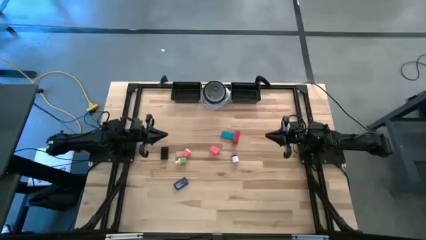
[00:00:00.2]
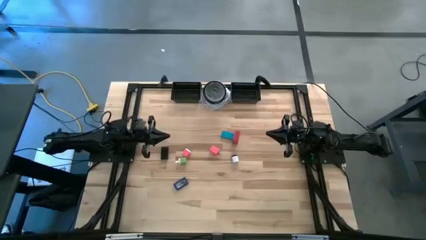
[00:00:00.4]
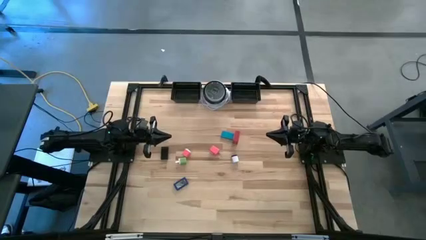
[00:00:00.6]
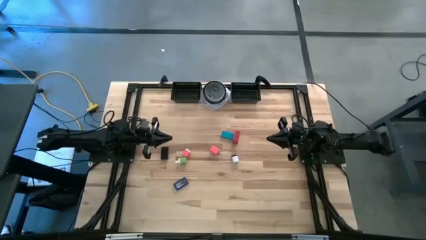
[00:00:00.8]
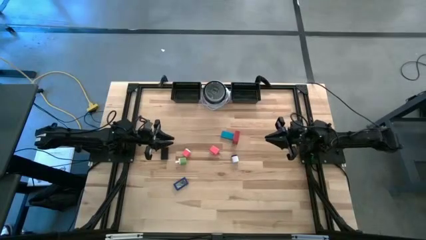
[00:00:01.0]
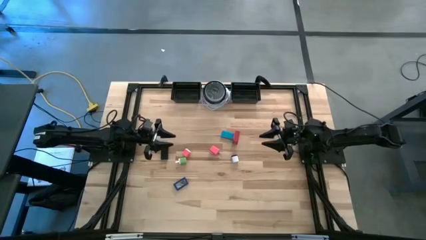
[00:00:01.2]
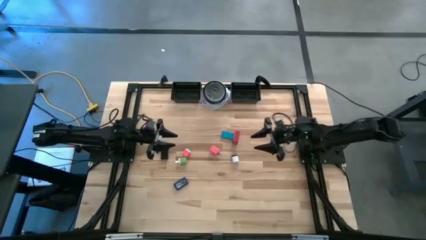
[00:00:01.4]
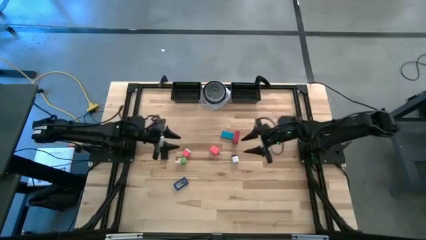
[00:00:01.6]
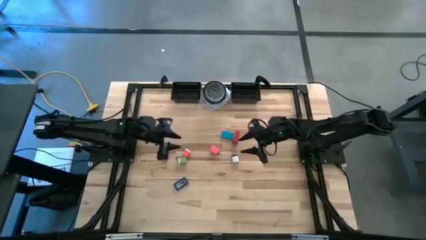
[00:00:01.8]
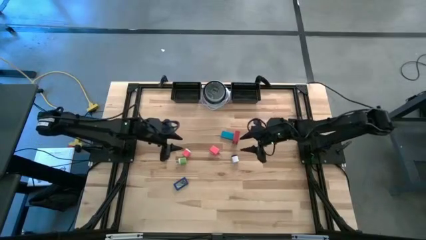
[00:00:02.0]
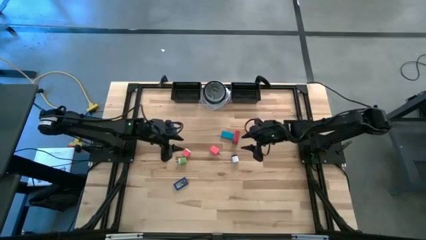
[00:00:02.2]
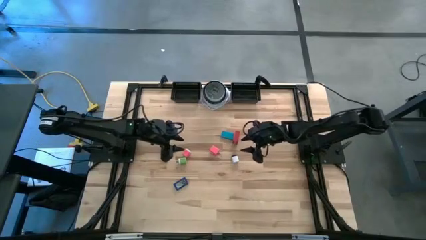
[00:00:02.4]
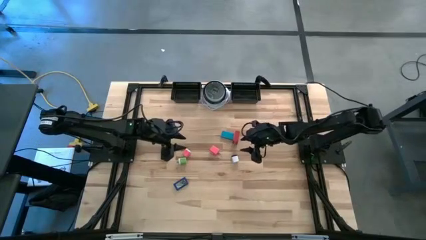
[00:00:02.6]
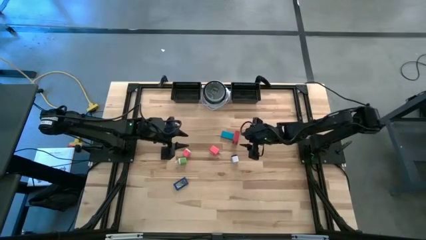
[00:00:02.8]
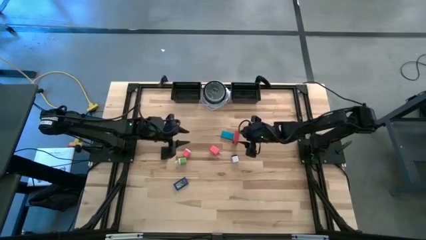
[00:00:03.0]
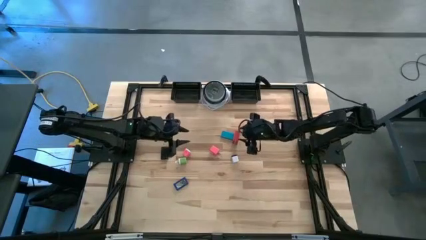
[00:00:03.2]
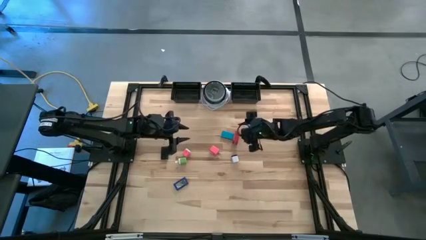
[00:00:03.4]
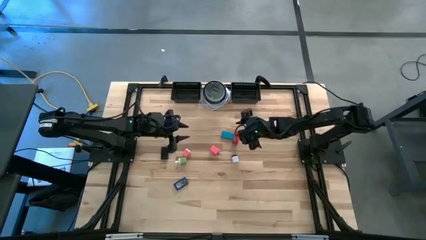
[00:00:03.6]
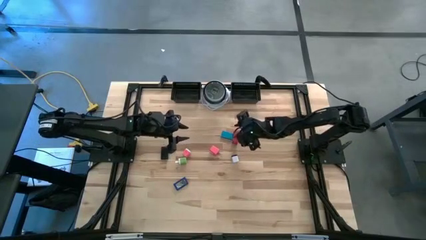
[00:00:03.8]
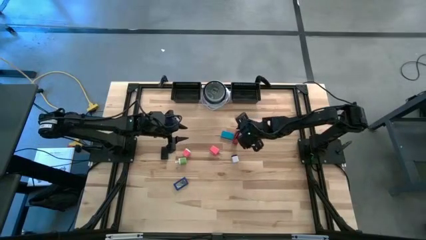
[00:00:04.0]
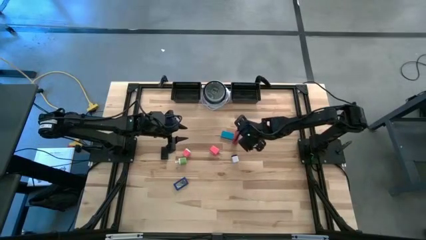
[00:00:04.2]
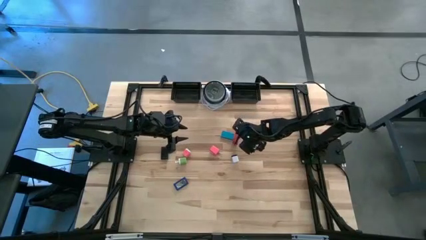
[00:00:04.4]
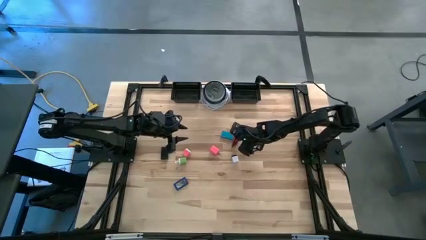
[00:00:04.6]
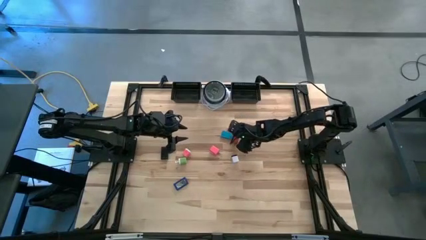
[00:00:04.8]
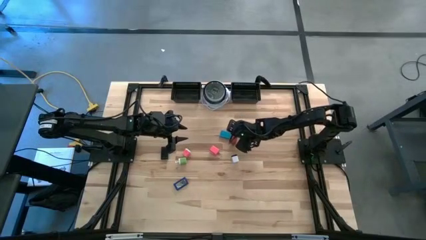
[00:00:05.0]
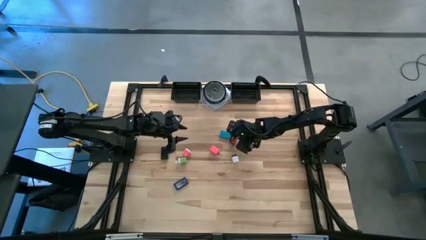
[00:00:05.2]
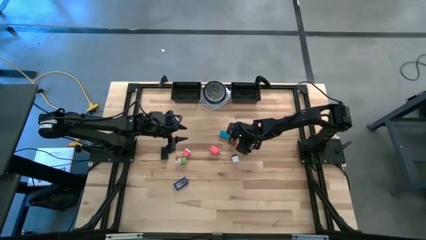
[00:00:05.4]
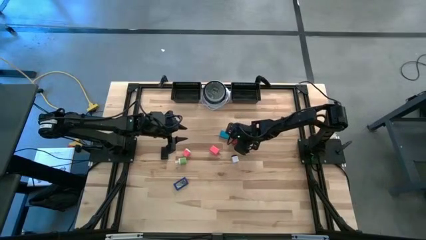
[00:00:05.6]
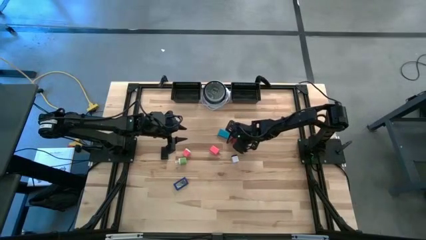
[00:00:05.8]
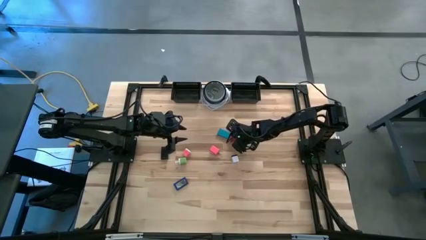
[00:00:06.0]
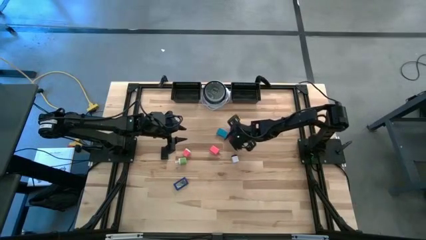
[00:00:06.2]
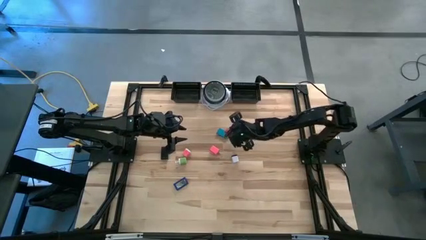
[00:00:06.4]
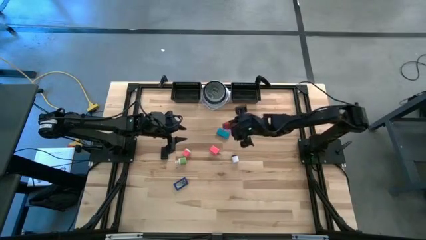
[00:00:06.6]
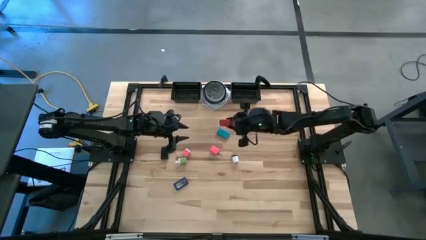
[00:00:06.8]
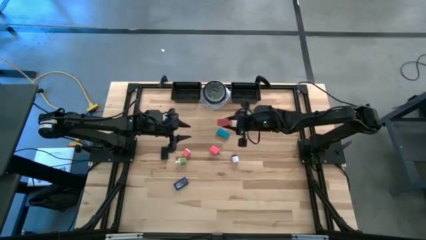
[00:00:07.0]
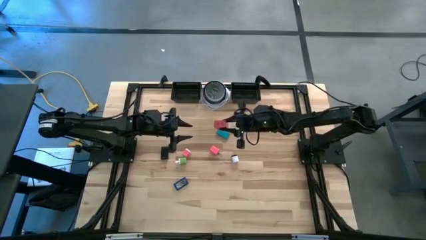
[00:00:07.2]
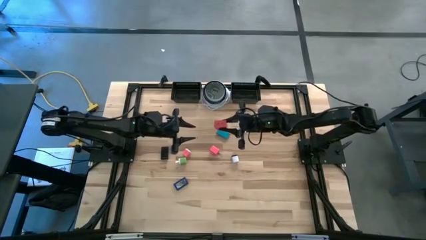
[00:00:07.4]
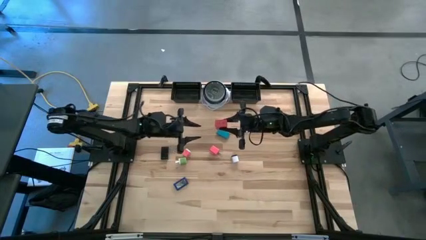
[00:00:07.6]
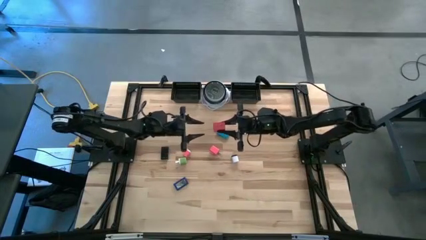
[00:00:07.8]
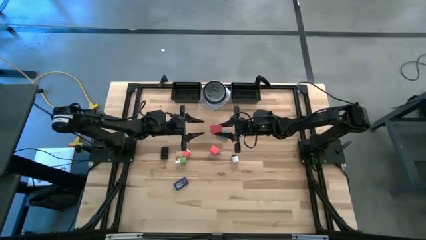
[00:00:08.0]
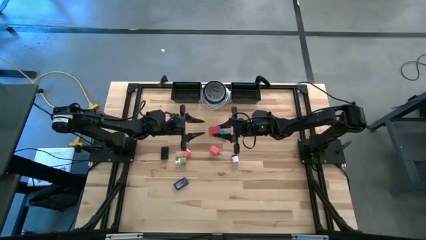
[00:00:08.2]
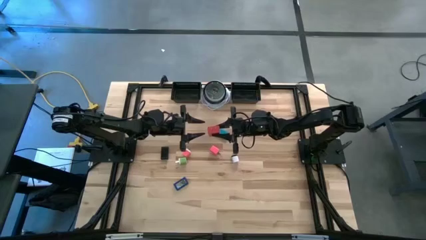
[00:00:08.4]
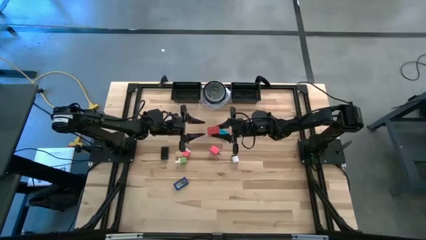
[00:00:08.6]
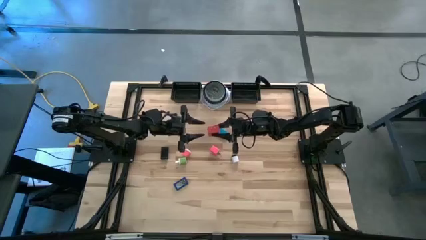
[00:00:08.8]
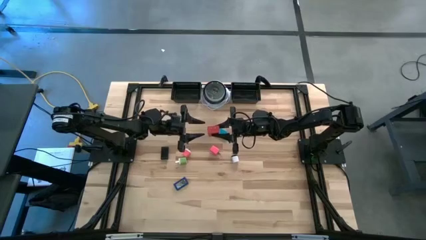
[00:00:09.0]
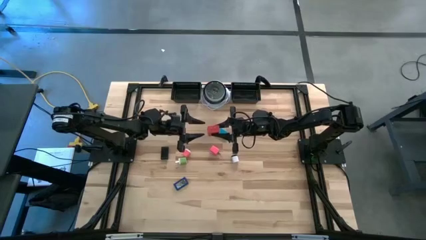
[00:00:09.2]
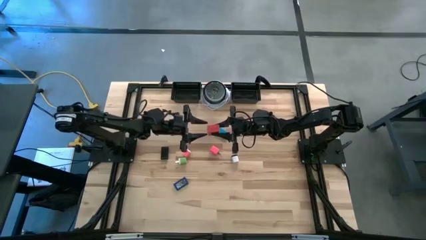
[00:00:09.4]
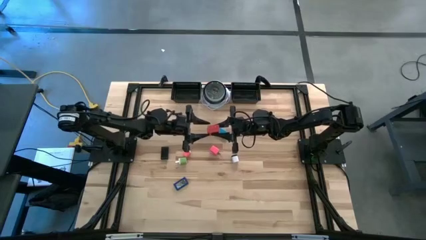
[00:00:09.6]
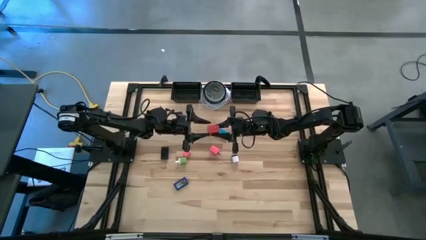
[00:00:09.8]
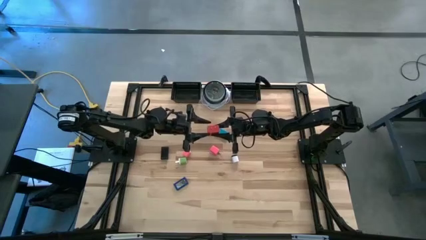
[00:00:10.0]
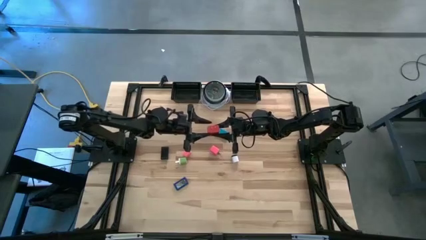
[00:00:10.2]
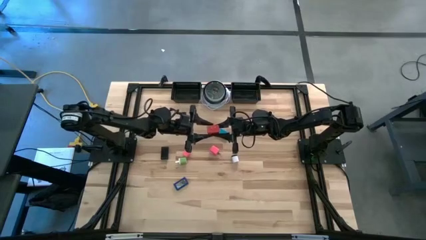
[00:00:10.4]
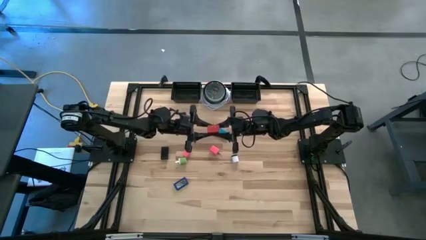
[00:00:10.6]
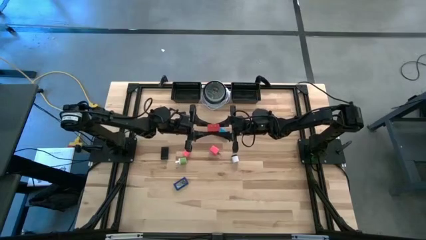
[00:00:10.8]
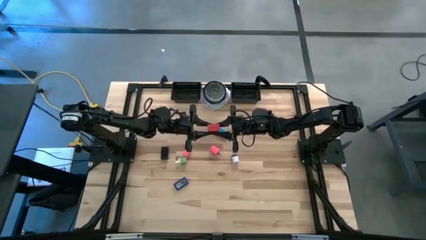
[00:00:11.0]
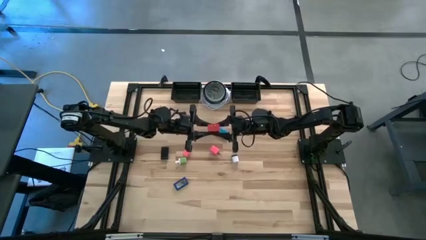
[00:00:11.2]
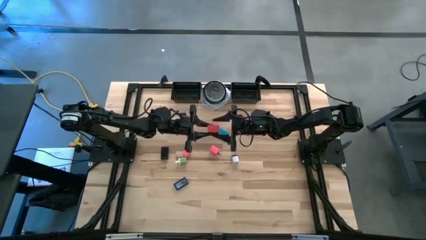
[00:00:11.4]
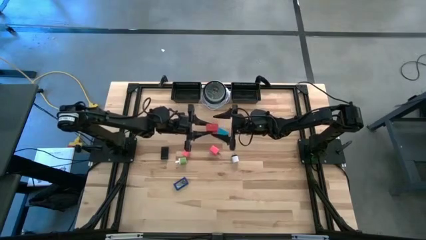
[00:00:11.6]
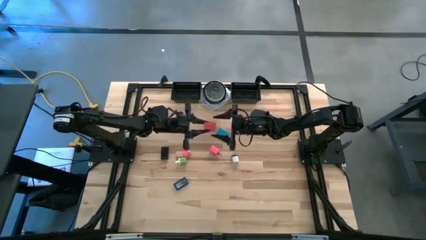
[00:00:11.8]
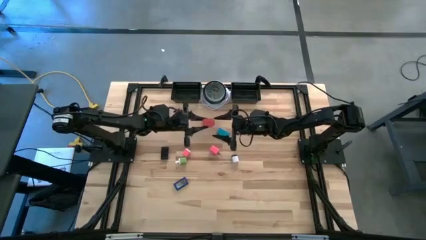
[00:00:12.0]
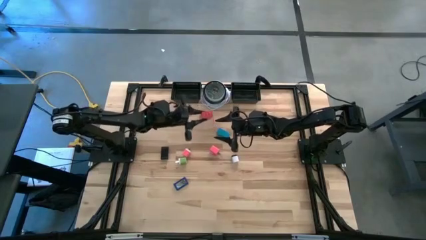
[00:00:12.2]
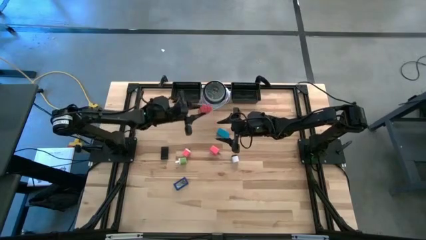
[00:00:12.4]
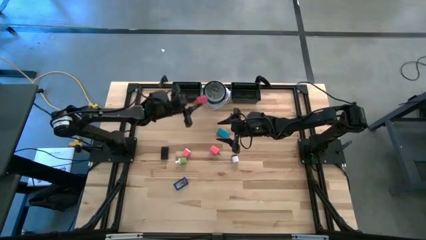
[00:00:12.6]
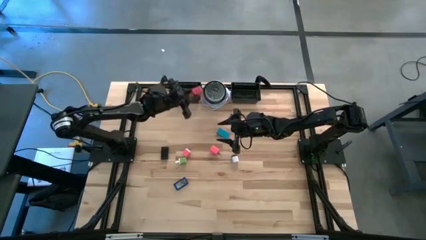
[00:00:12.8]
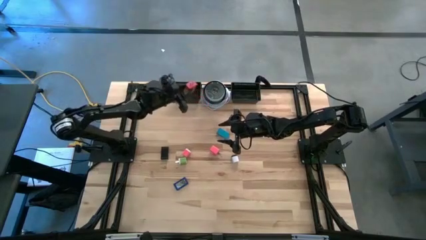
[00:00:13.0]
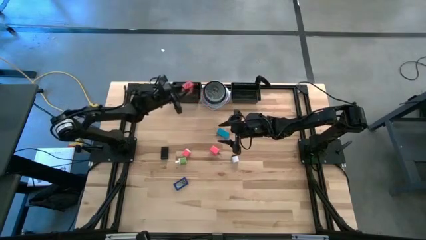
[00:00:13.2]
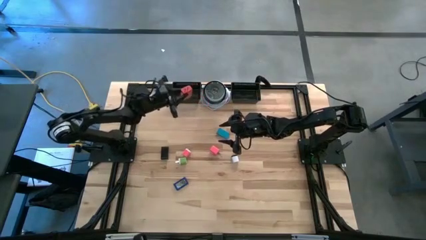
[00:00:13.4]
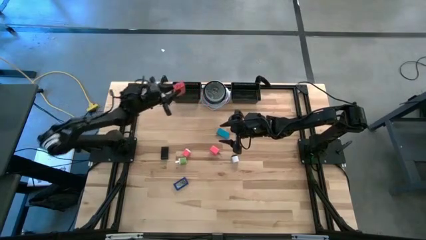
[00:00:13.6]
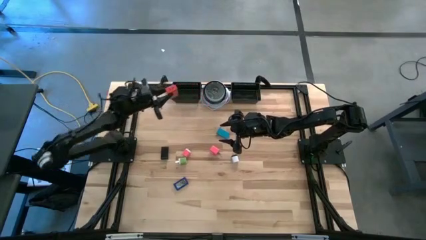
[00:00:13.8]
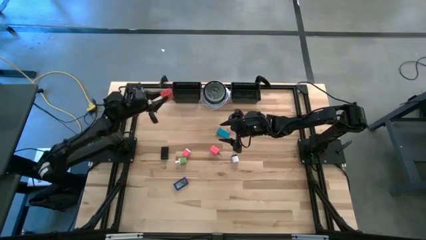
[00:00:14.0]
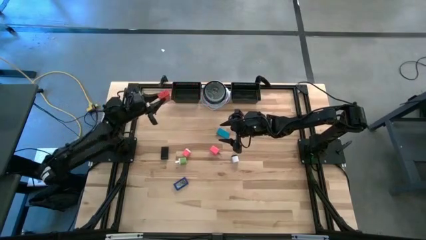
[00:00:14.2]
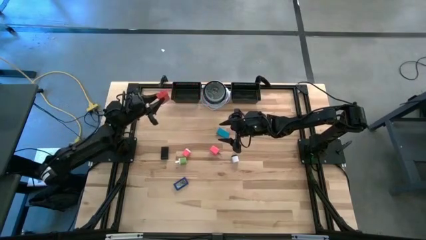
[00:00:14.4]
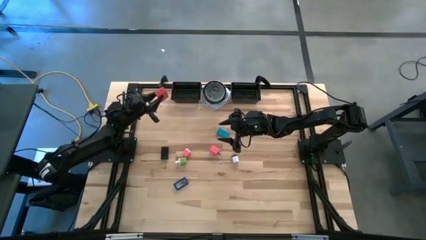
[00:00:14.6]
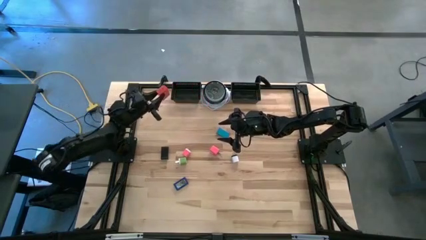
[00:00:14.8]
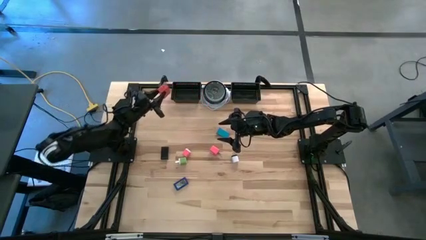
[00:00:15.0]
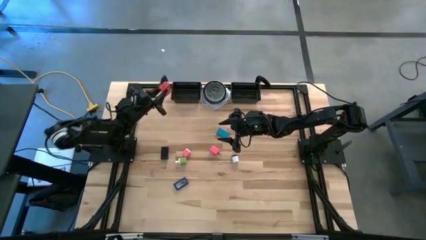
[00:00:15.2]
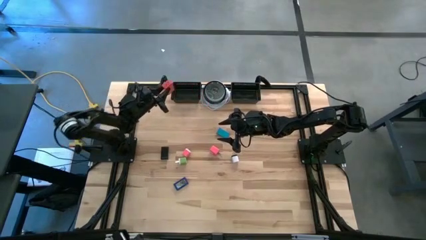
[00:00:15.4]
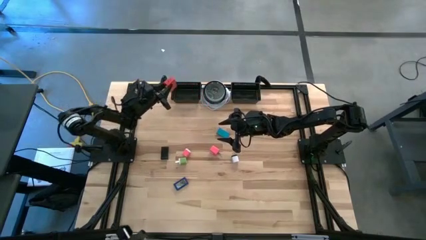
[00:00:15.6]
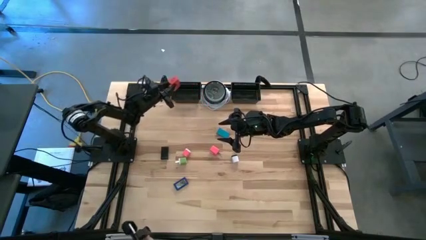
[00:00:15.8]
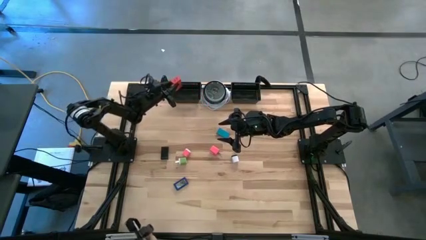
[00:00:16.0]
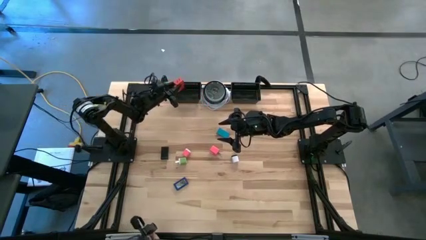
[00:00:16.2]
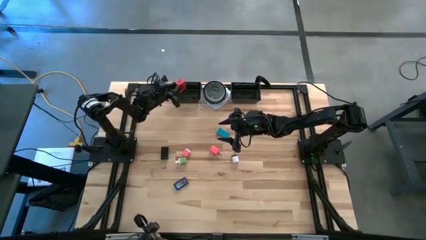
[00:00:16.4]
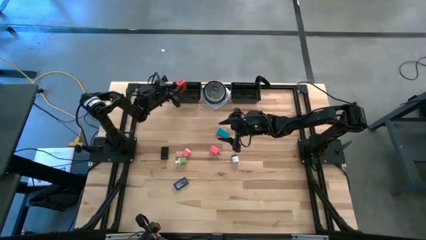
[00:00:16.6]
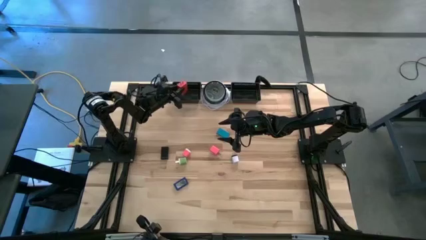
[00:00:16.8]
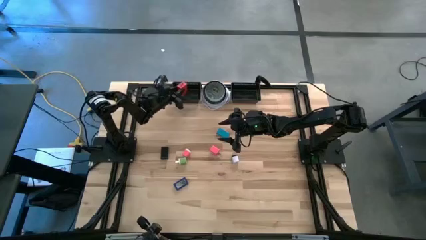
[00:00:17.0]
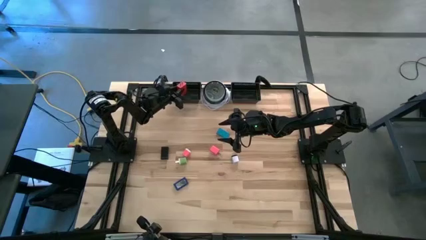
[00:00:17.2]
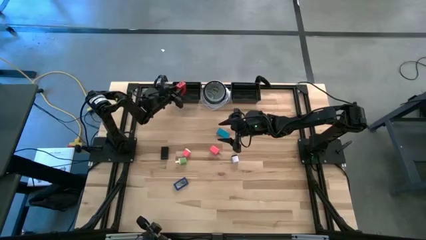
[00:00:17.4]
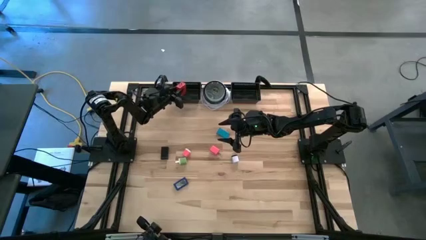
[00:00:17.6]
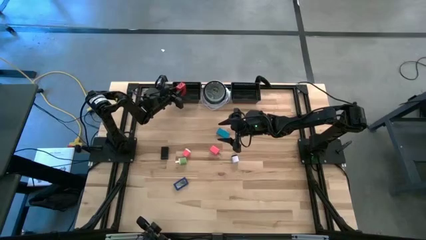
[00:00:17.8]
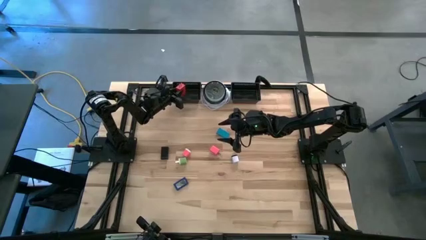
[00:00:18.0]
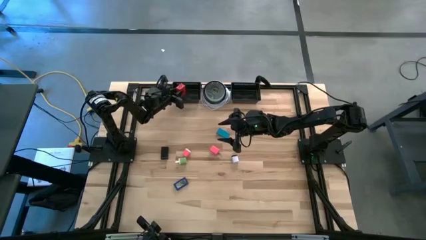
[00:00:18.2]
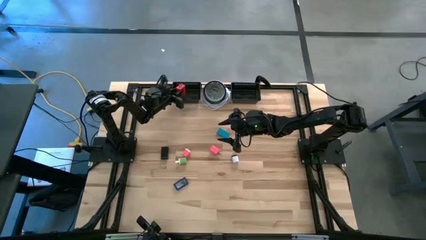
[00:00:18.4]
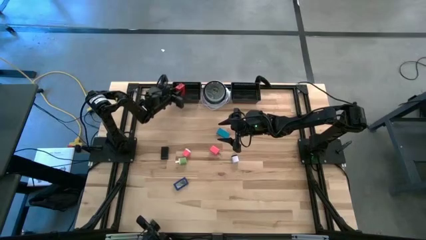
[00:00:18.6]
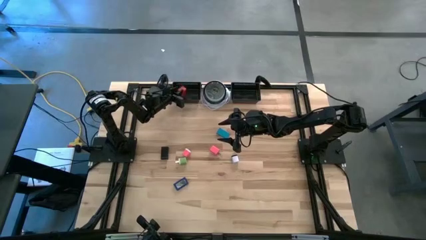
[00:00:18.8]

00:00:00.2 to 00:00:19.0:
Task: Pick & Place Office items
Put the red charger adapter into the left black basket
